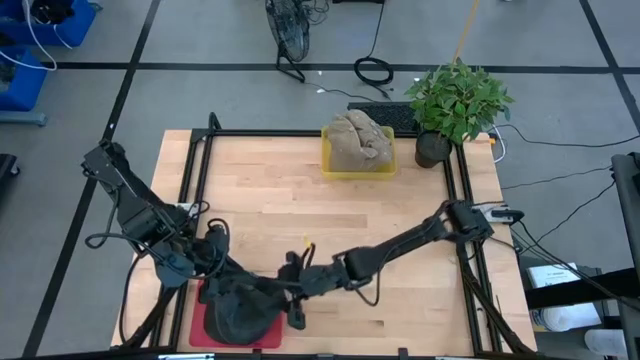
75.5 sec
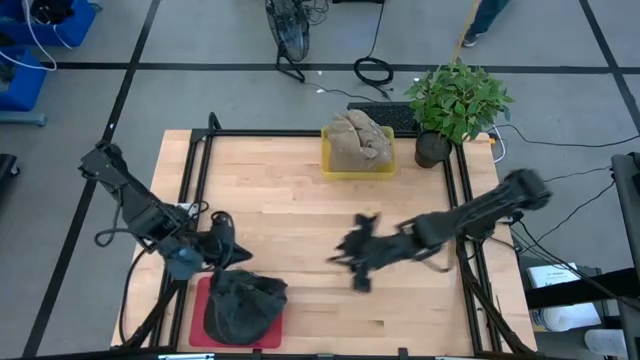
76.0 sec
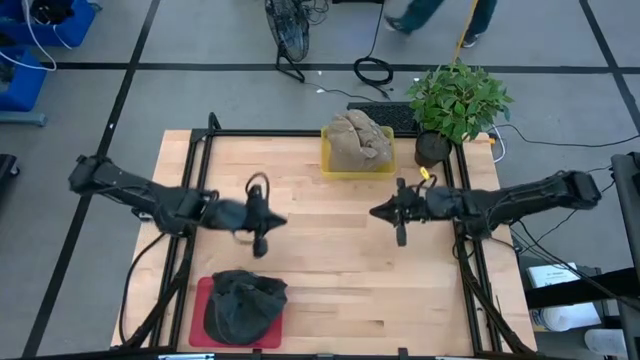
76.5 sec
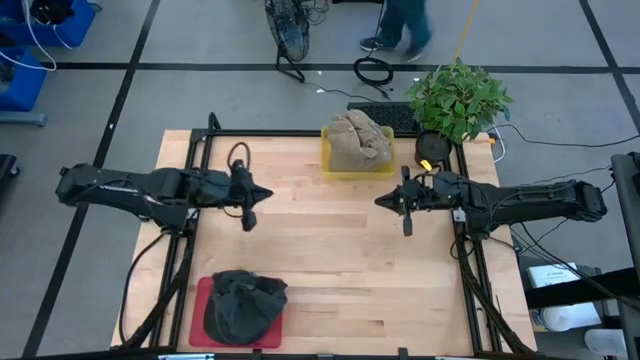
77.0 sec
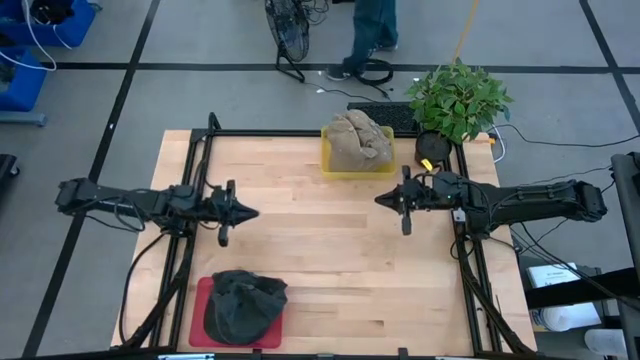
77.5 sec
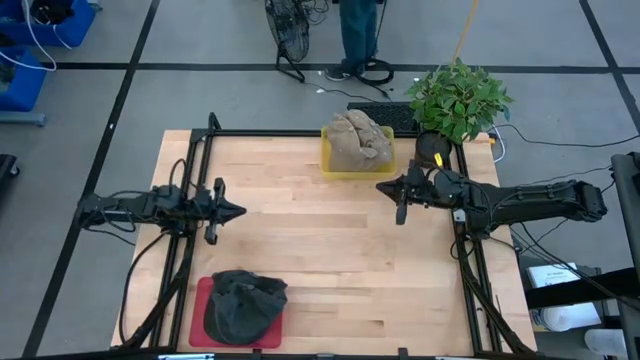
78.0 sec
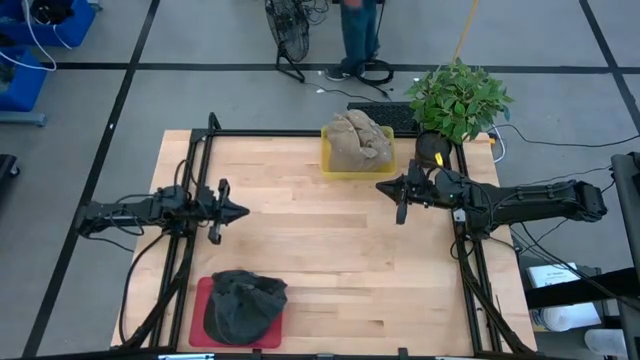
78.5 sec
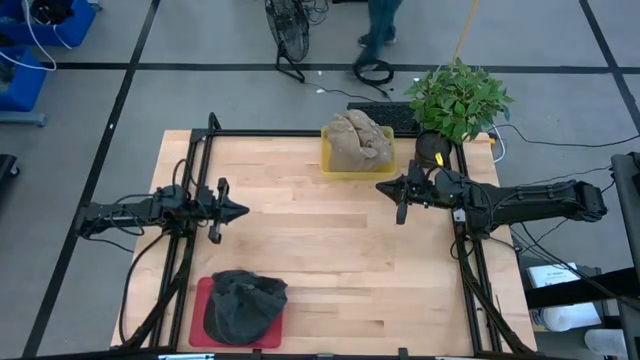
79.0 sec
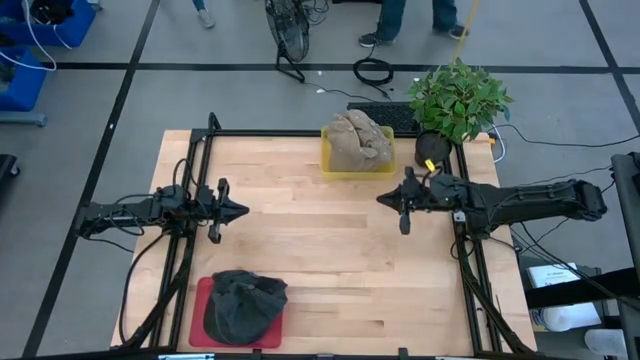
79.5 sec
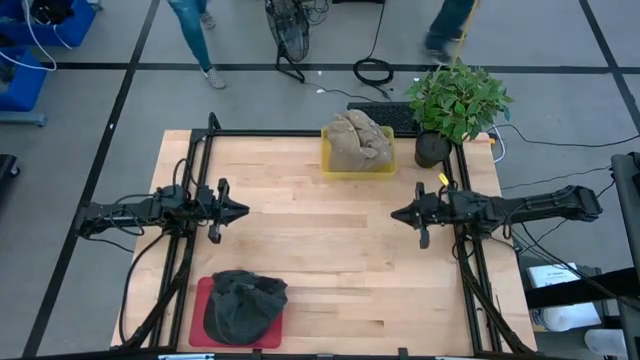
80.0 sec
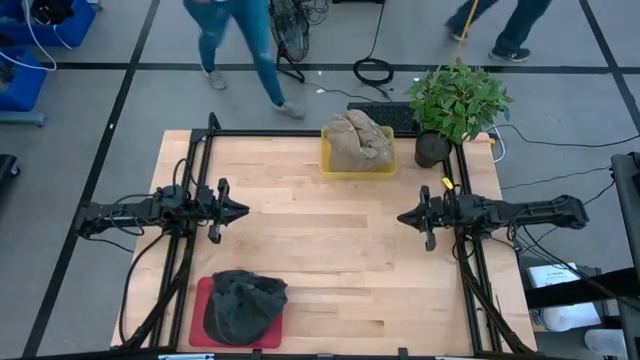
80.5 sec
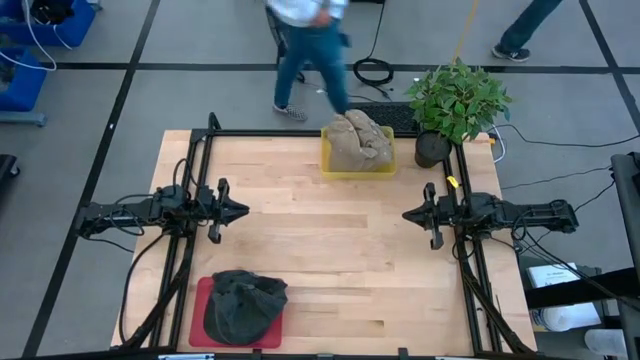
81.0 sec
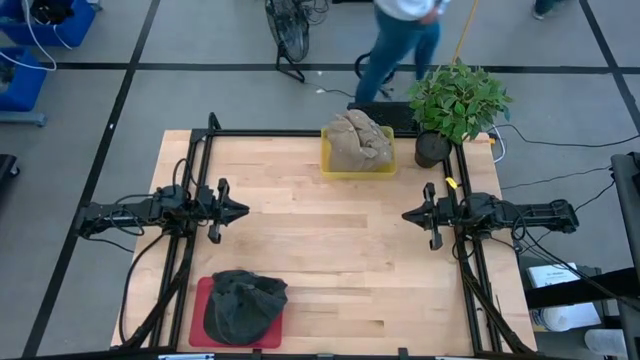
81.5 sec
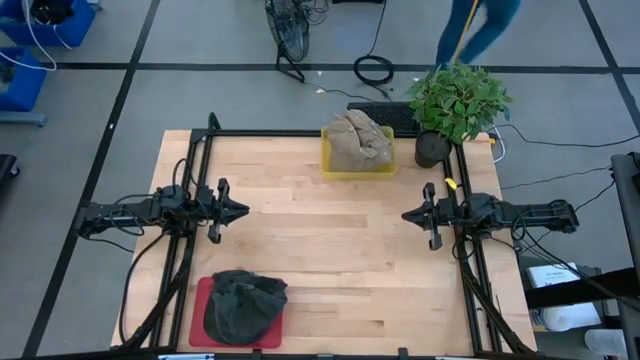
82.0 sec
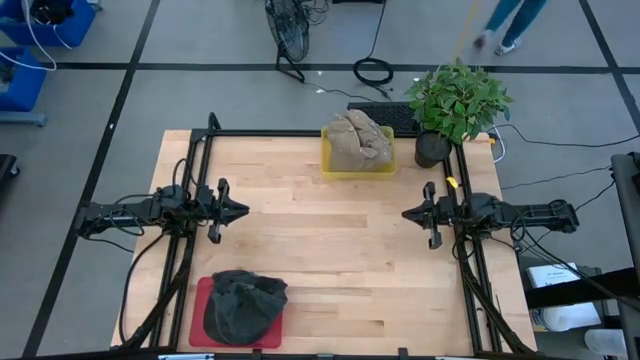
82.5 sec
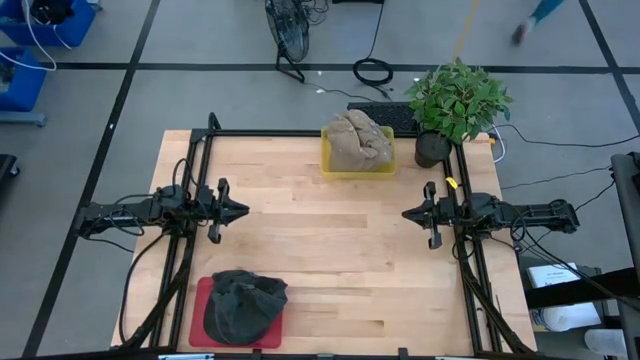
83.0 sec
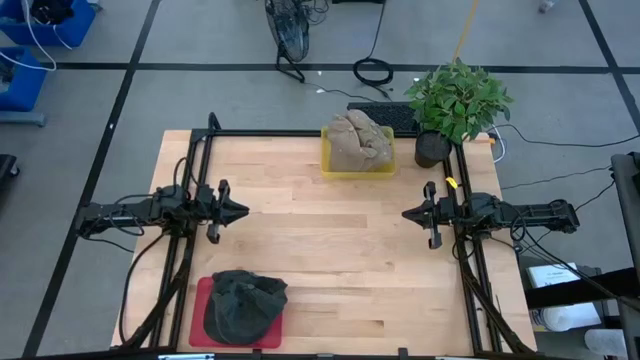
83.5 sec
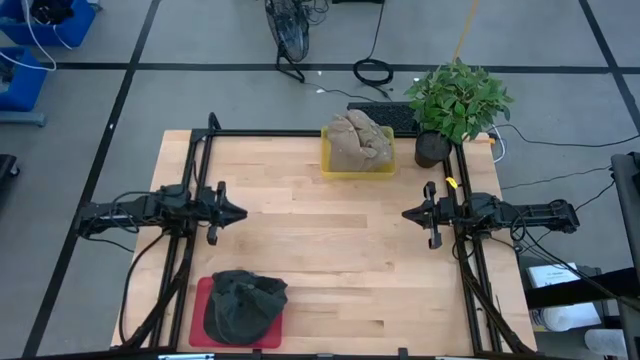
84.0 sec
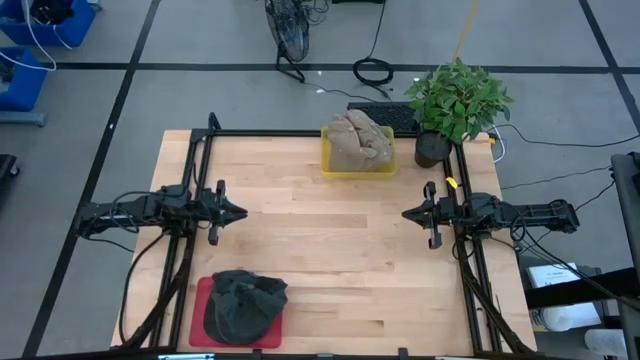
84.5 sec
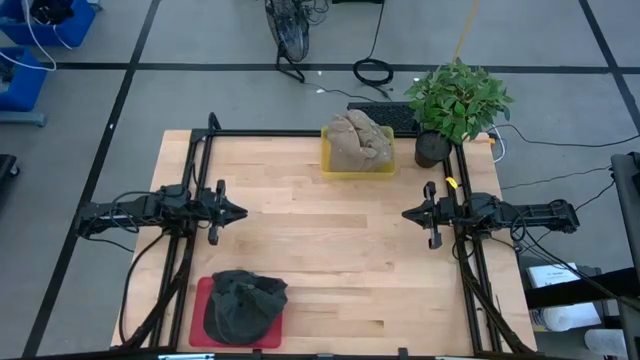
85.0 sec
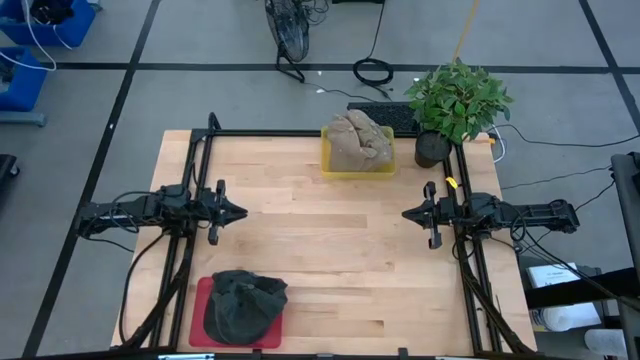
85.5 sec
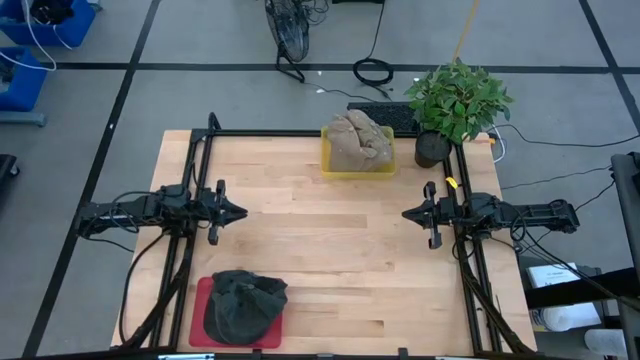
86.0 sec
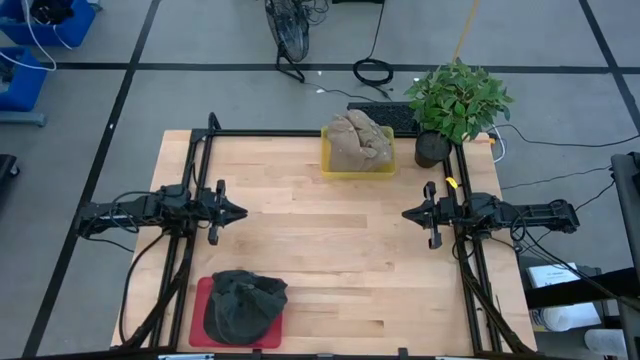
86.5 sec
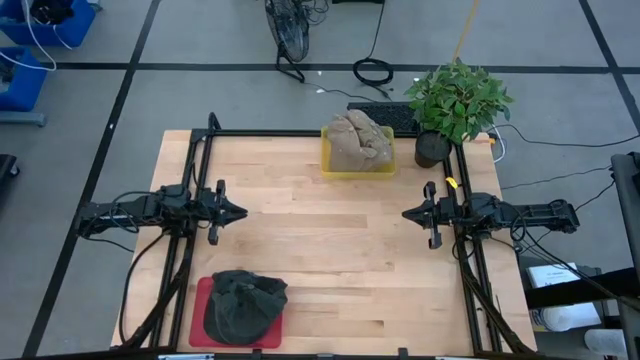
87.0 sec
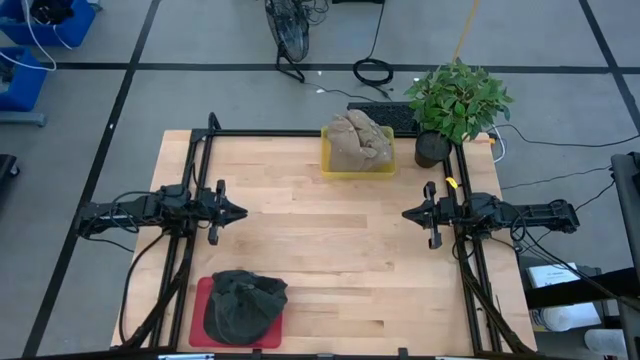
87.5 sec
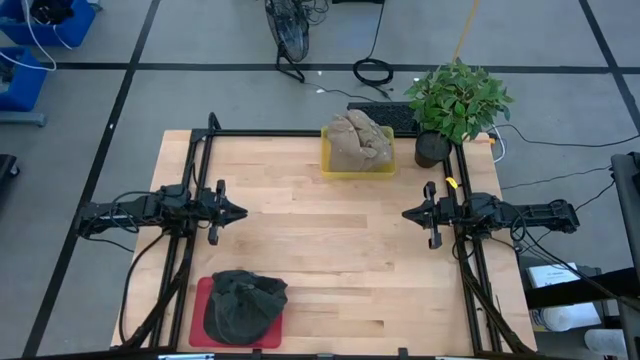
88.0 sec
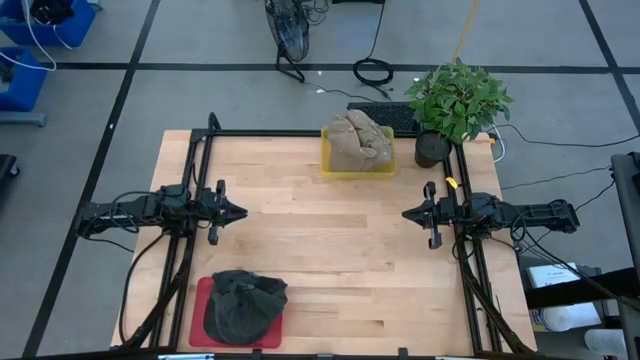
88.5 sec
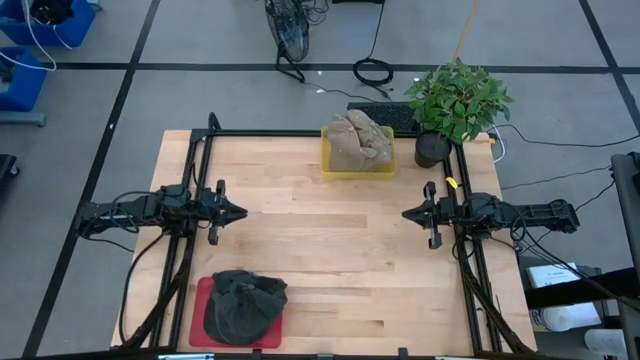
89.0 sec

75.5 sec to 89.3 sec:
Task: Pick & Place hat
Return to Home Position

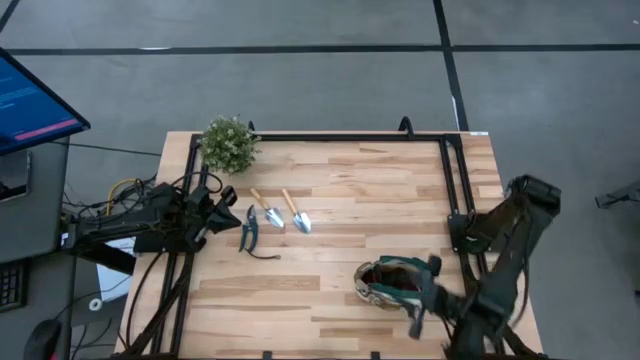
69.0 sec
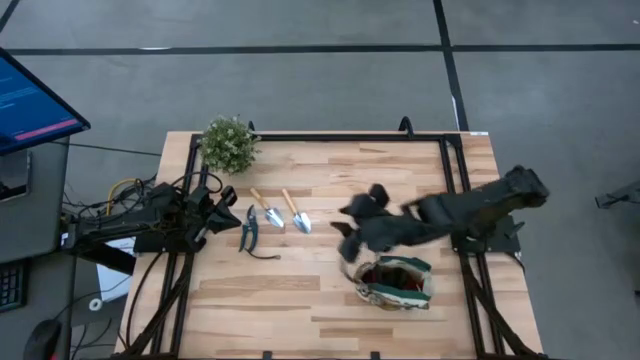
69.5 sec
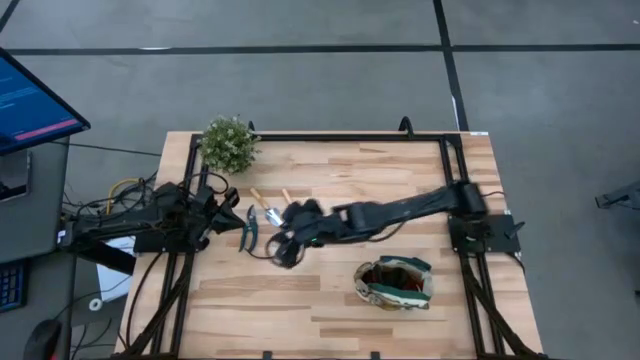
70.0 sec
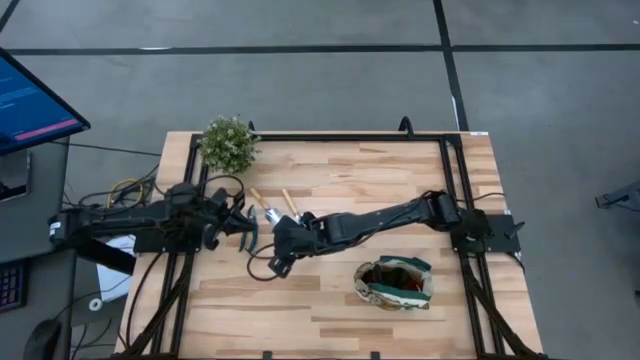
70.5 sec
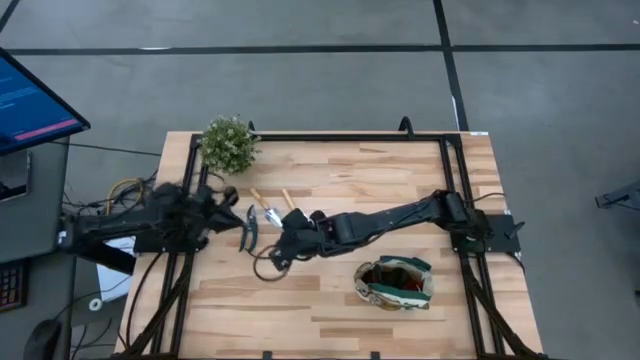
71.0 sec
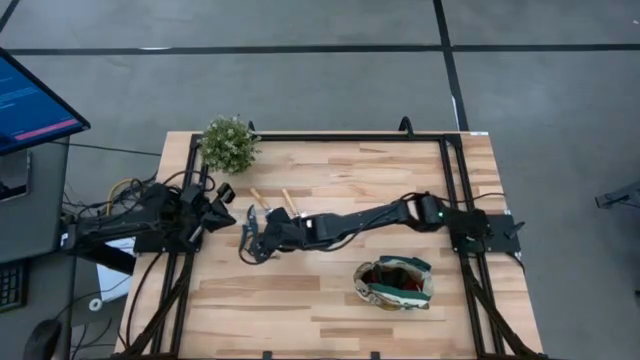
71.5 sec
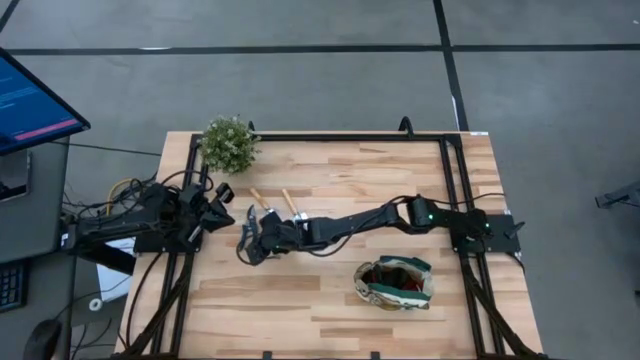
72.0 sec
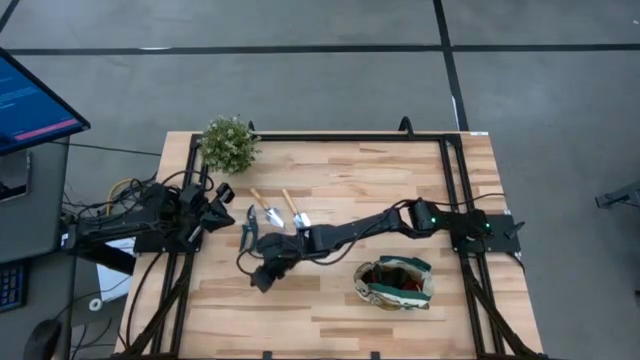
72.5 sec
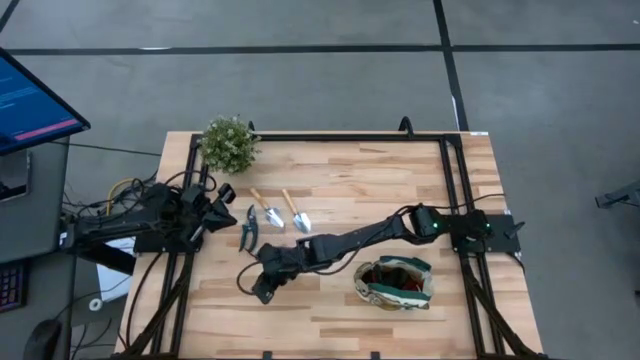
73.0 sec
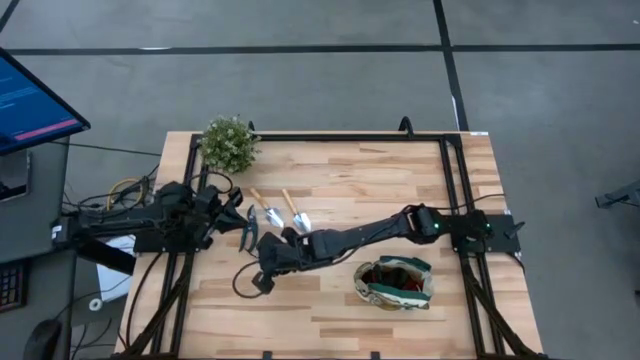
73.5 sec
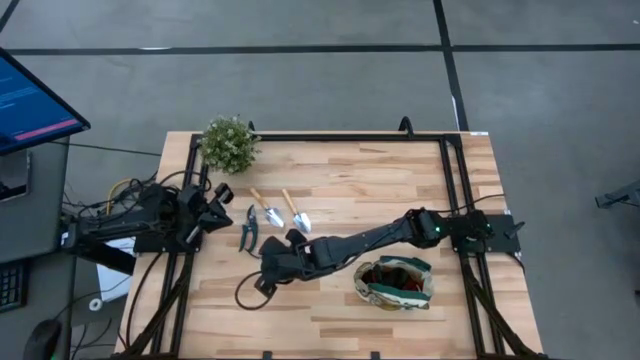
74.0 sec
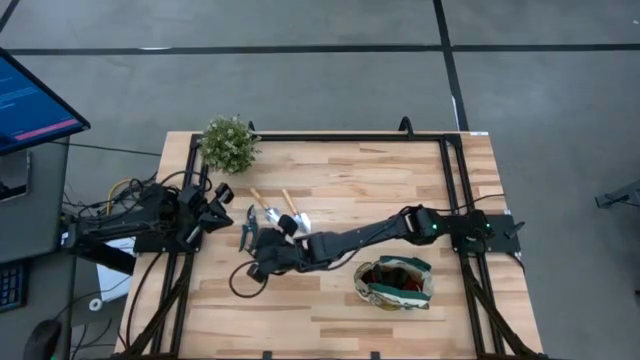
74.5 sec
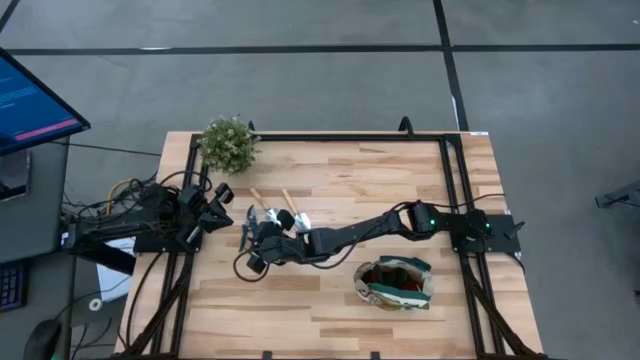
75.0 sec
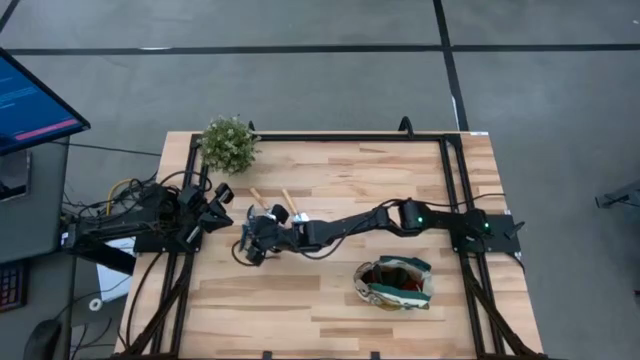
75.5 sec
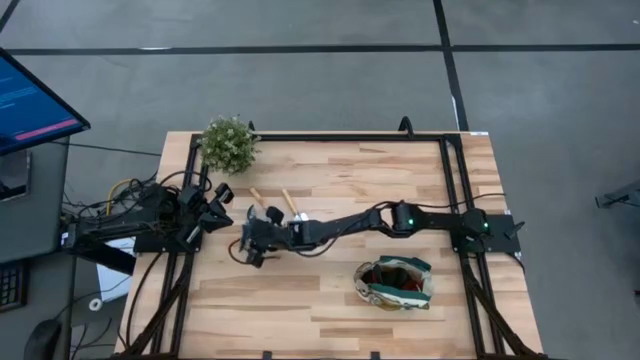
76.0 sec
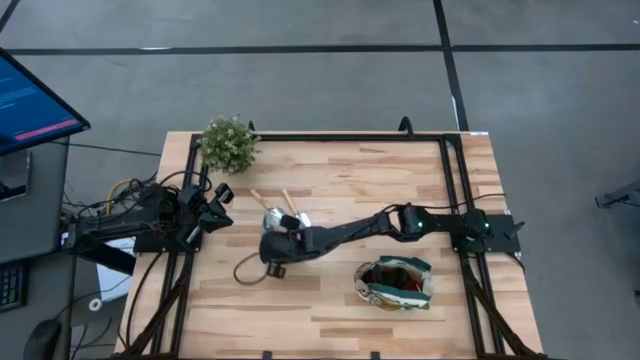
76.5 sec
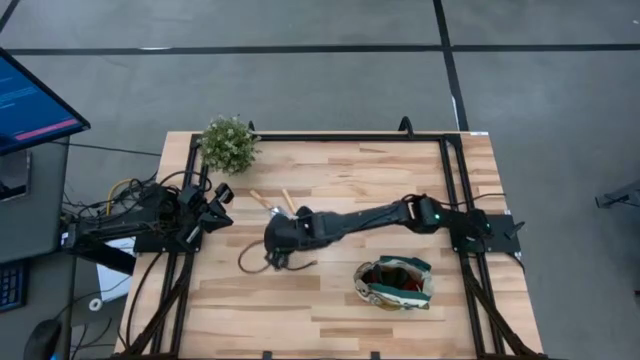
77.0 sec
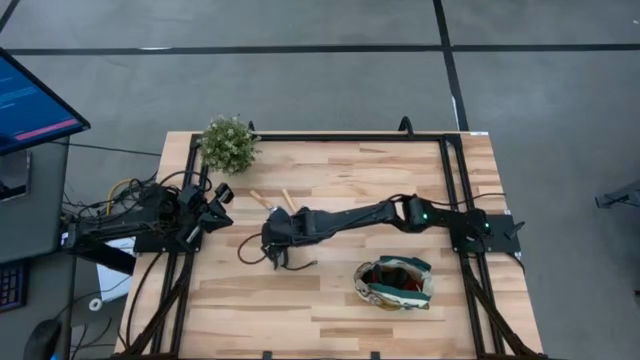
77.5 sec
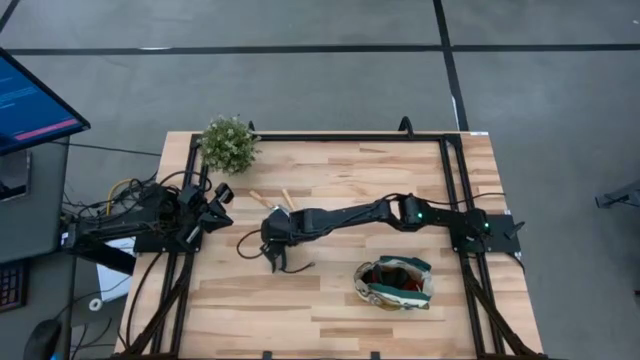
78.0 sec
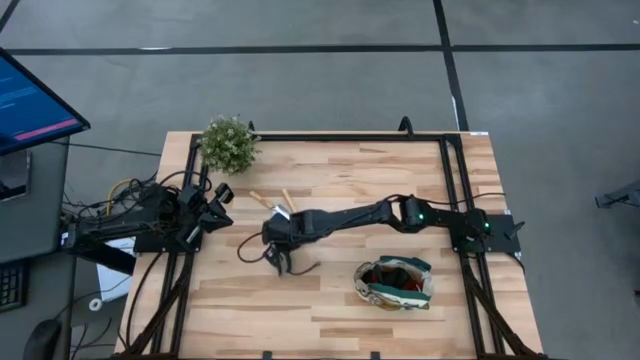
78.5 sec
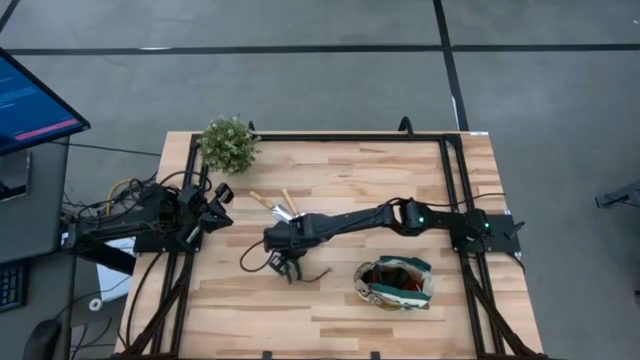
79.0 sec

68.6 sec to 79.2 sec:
Task: Pick & Place Garden tools in Gardening bag
Put the green shear scissors into the gardening bag
